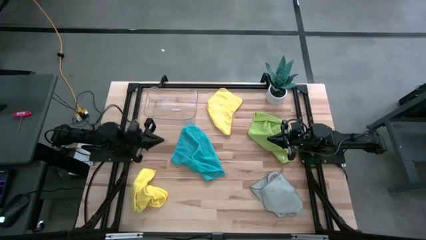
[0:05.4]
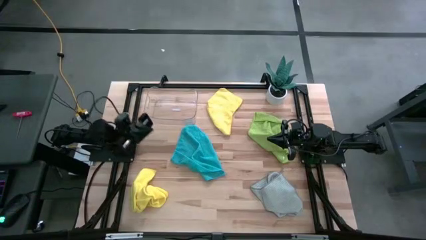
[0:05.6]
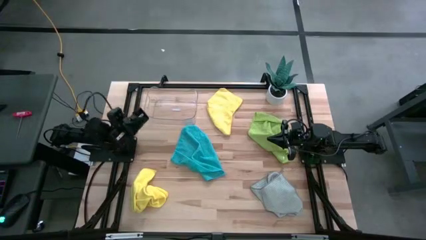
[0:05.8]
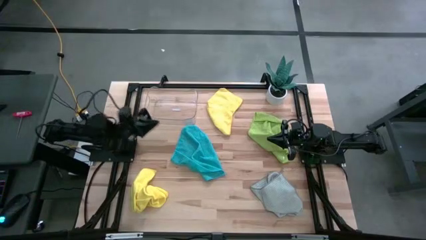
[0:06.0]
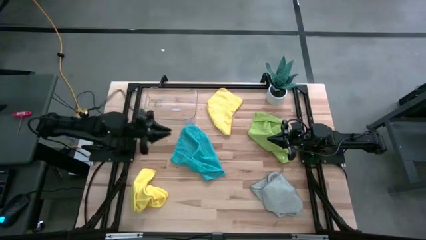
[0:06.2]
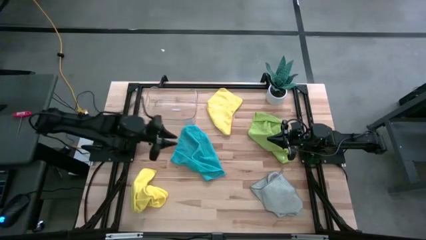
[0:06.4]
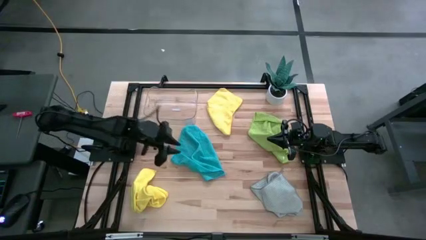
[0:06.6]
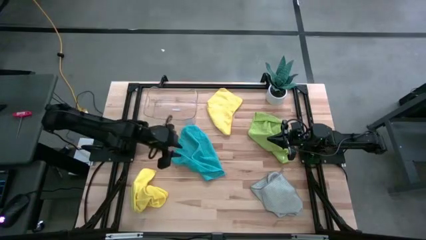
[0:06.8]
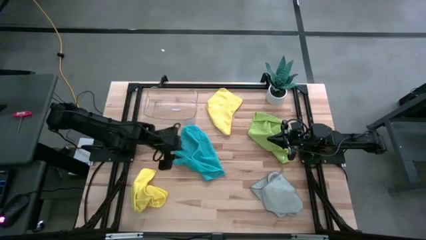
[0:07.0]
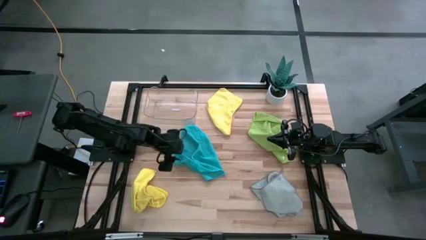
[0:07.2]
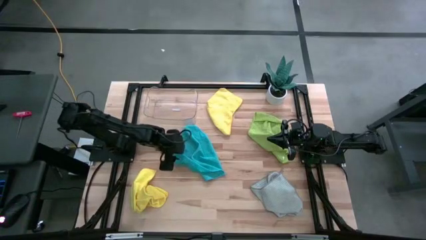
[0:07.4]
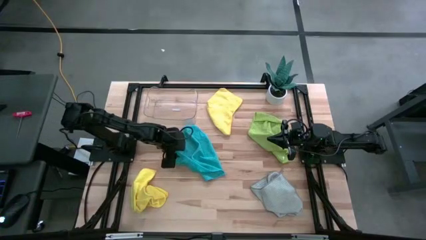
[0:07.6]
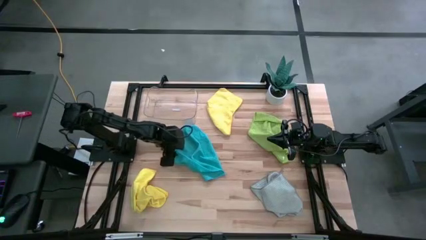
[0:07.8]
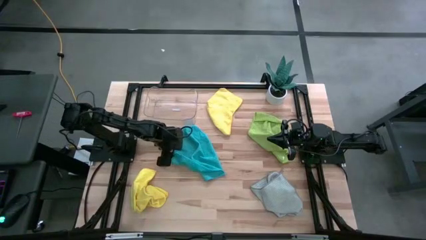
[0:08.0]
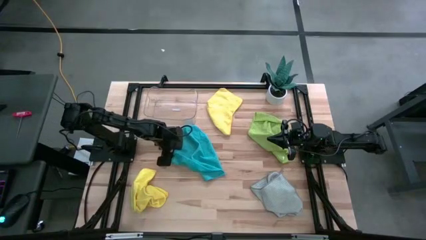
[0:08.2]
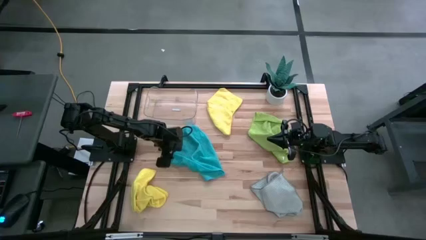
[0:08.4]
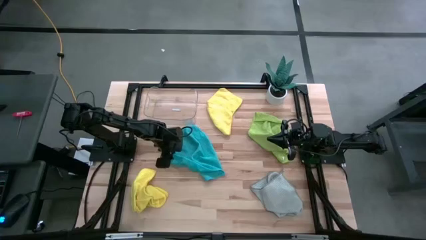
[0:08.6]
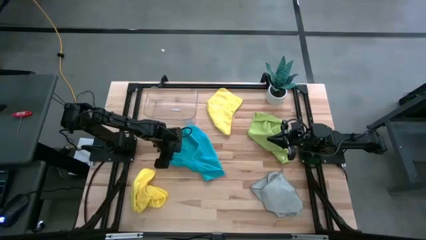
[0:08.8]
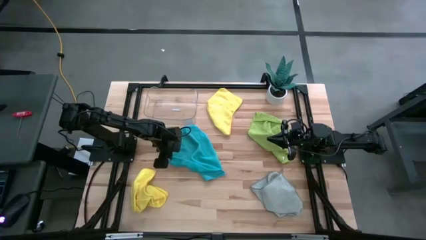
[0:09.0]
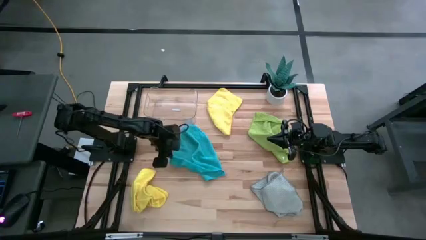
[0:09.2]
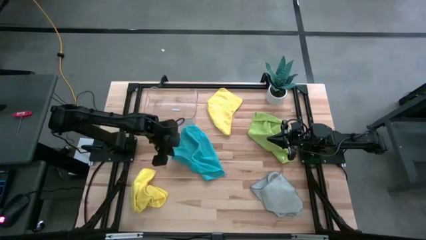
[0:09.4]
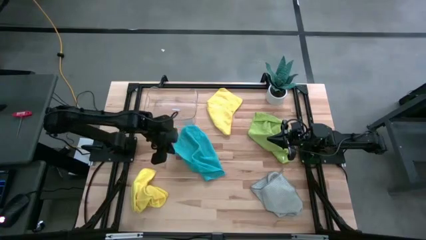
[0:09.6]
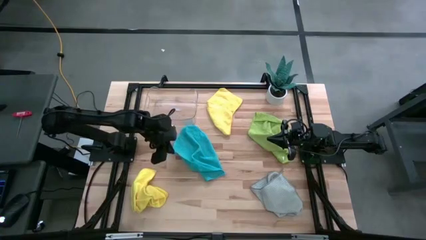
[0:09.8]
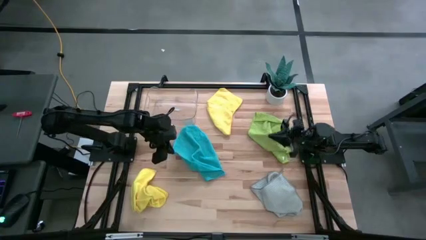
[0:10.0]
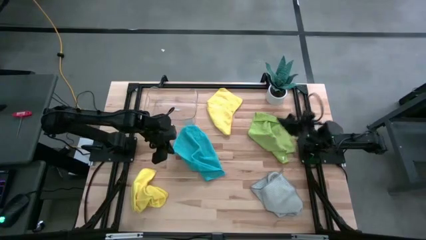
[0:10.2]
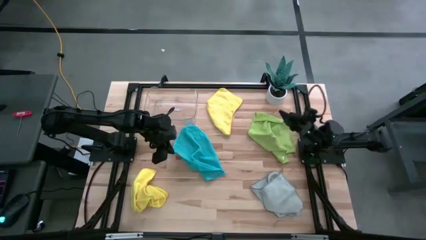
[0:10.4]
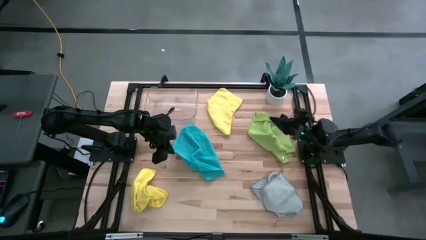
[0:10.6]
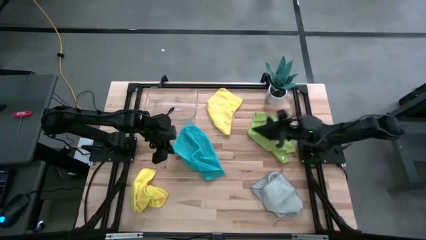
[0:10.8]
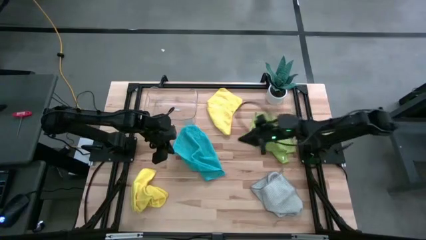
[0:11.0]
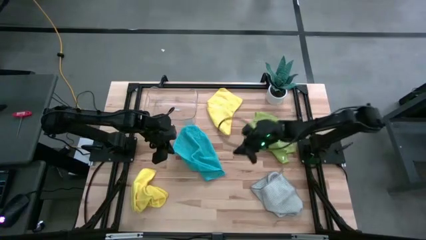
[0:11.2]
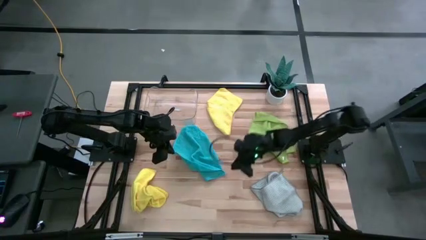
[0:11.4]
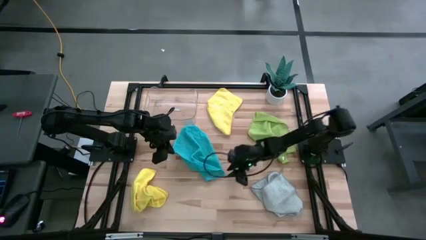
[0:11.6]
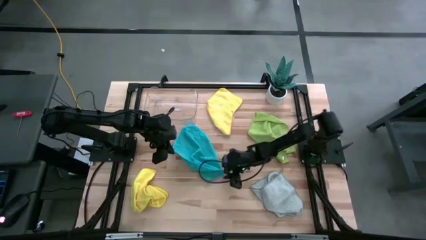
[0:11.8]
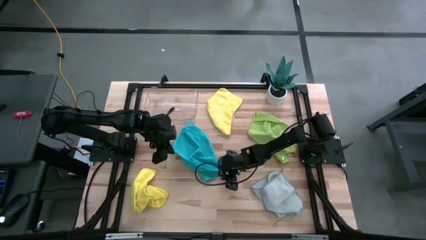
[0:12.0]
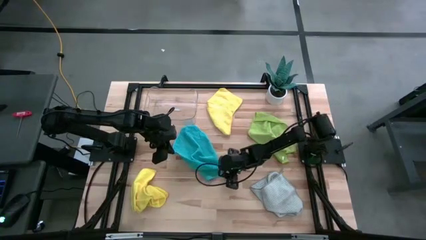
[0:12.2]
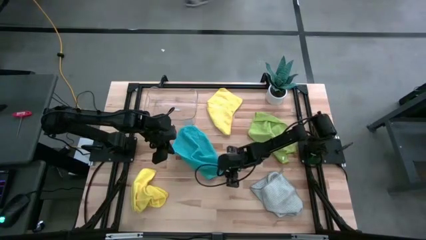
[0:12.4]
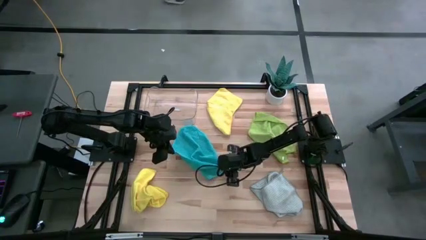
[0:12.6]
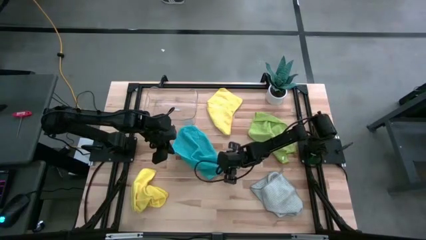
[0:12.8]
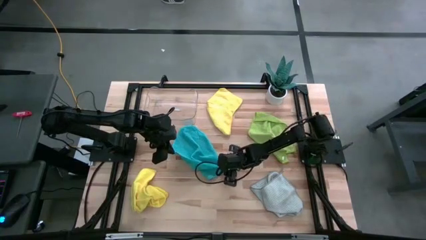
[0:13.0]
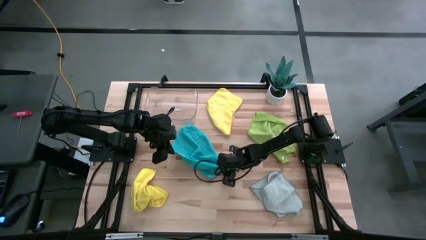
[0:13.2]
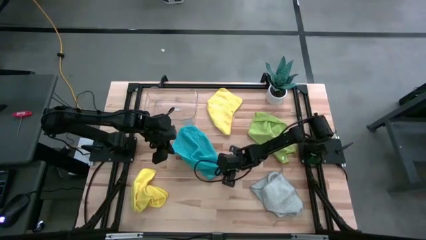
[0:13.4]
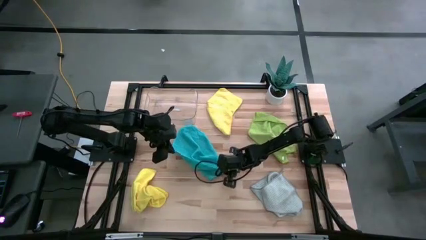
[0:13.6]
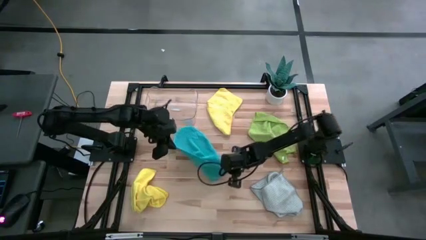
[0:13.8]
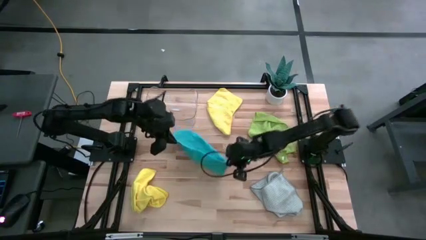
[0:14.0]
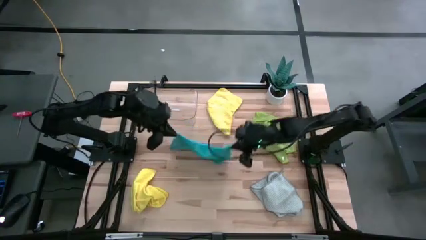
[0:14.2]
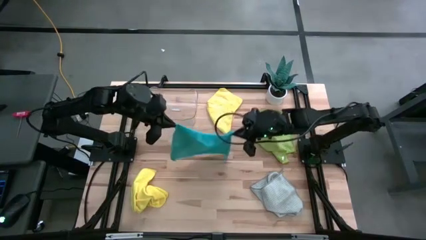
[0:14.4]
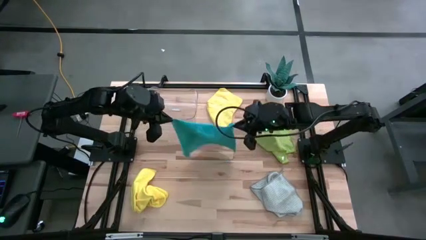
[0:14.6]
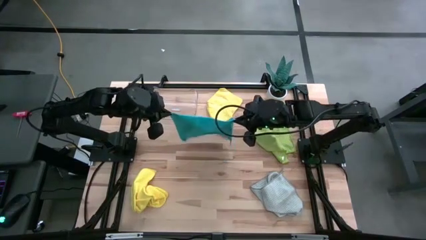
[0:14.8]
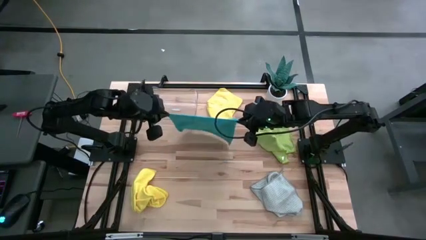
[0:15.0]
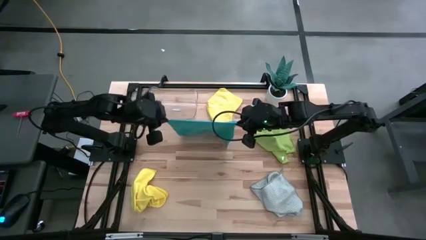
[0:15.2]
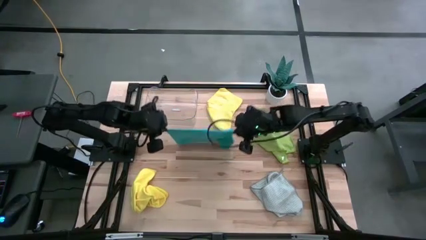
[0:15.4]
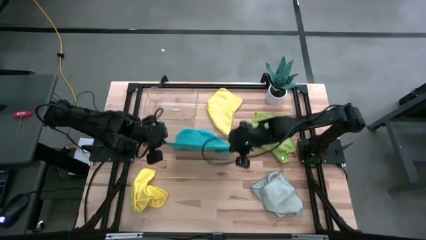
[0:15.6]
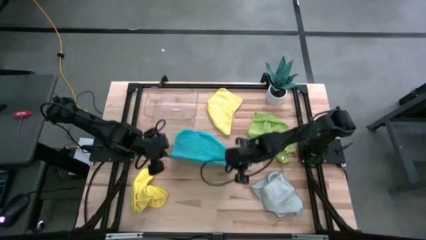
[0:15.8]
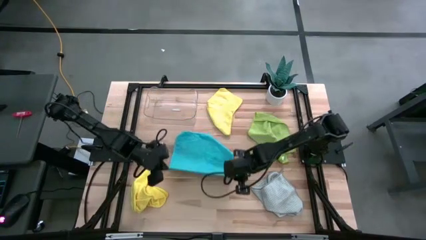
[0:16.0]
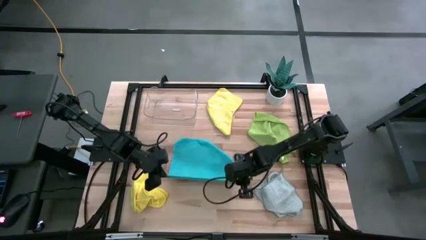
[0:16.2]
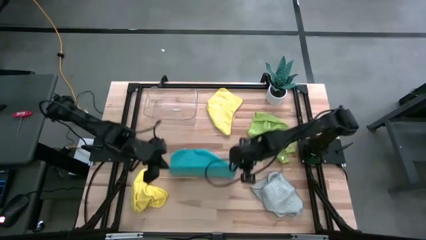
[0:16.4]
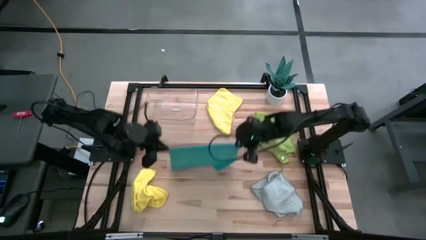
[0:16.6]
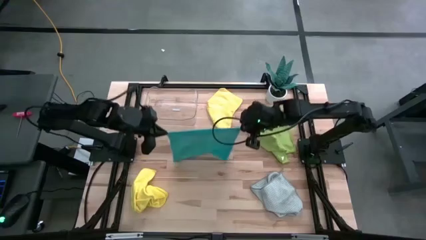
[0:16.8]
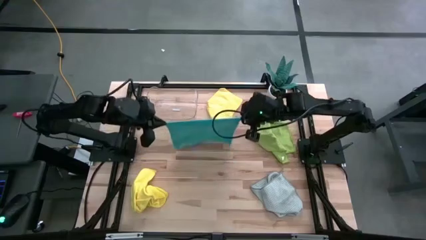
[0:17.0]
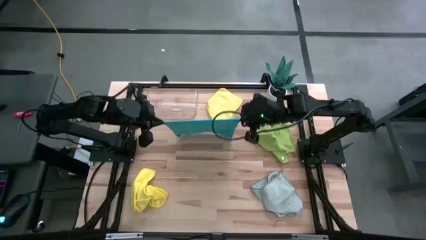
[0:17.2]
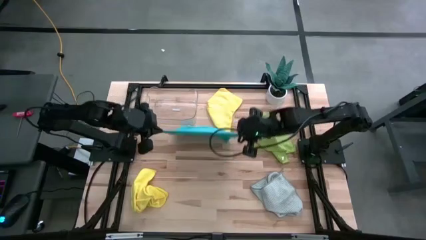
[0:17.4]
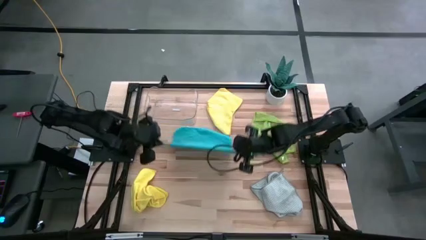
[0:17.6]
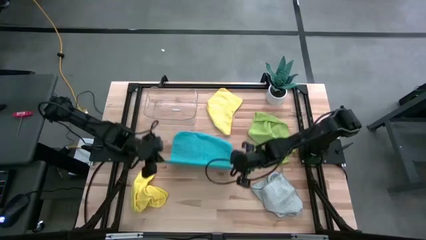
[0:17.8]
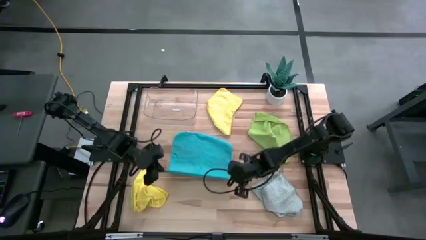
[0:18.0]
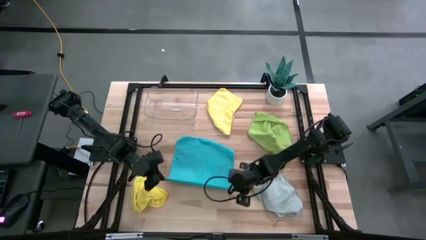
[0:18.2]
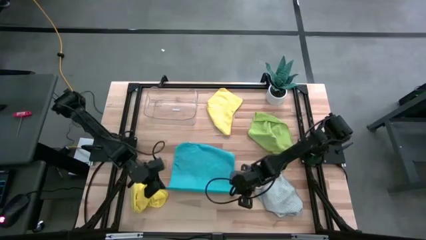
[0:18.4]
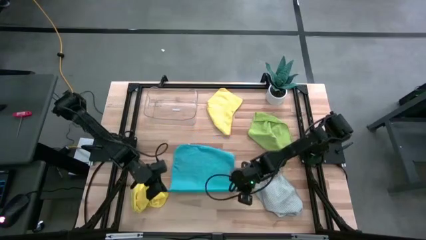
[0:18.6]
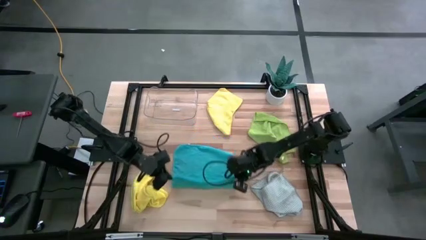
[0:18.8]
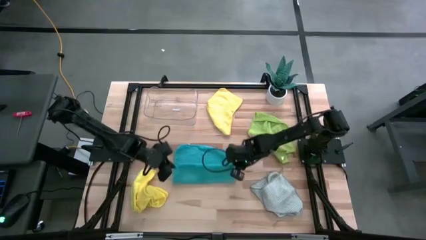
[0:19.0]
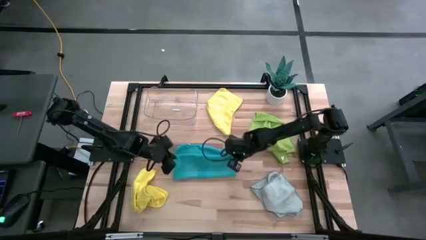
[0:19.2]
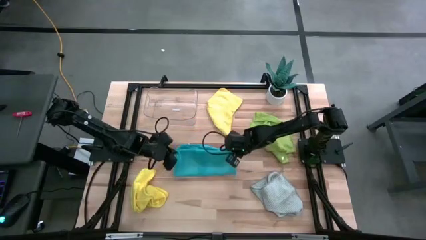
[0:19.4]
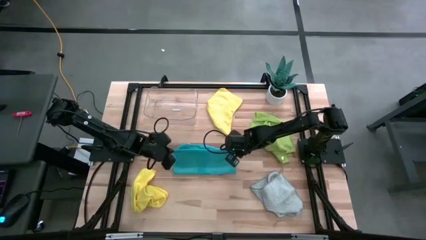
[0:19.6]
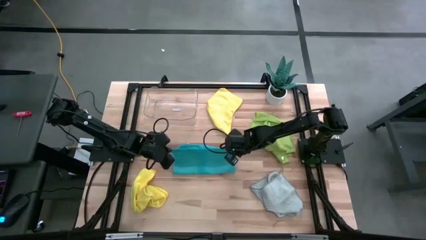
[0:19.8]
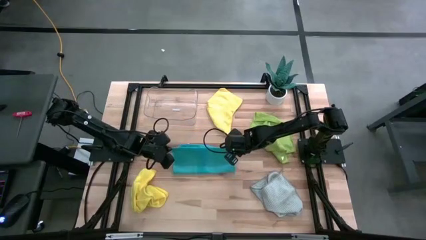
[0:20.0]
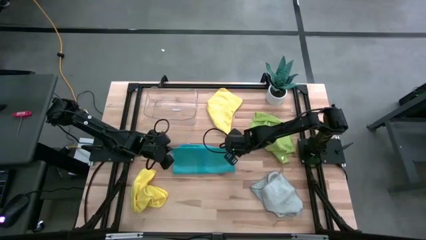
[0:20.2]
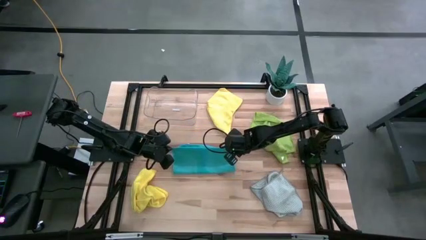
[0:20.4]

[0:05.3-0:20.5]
Task: Fold microfiber towels
Fold the blue towel
